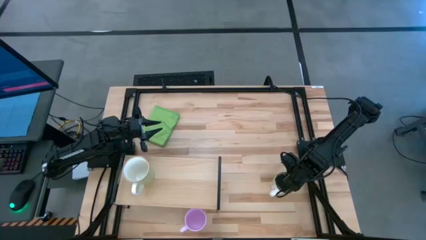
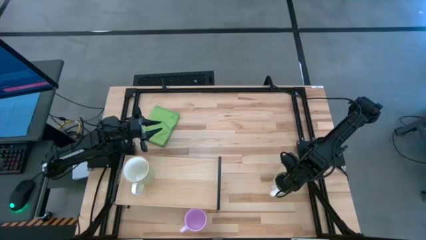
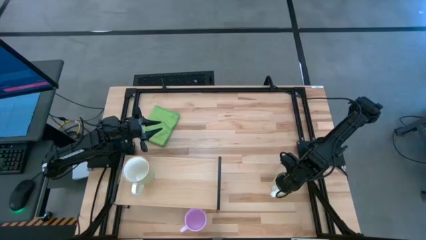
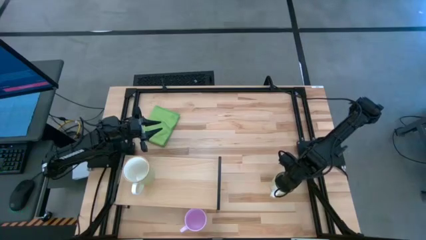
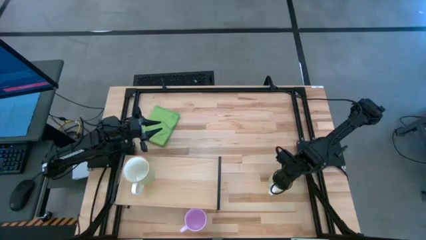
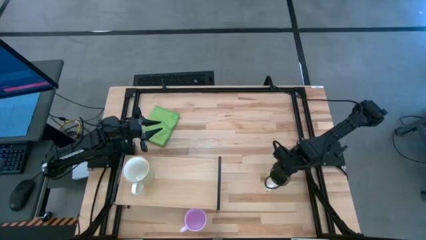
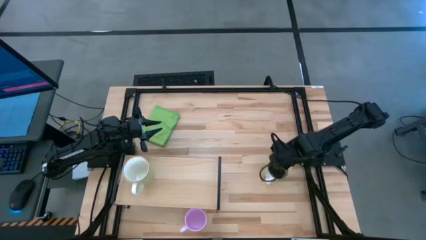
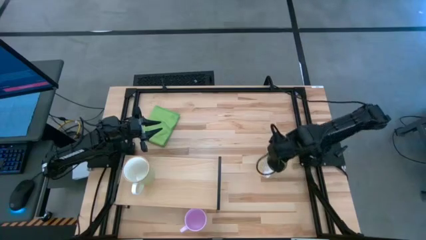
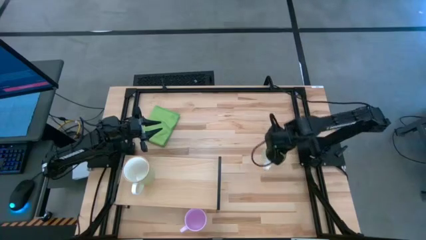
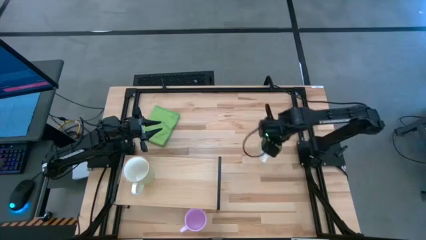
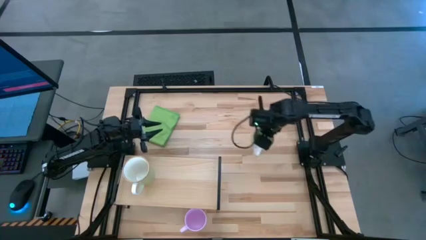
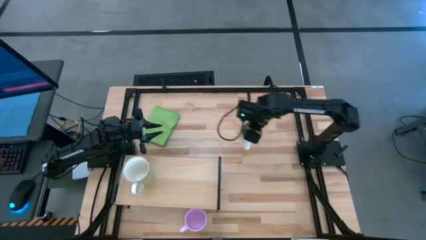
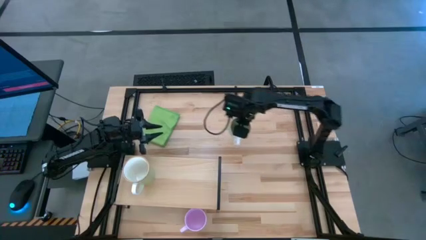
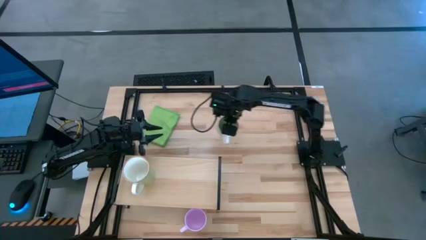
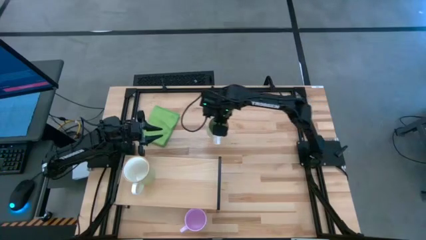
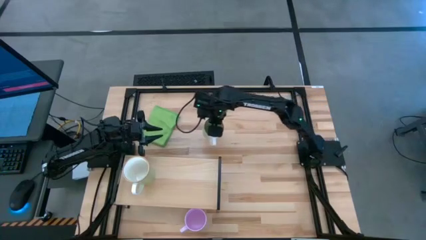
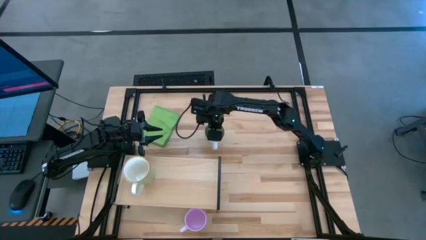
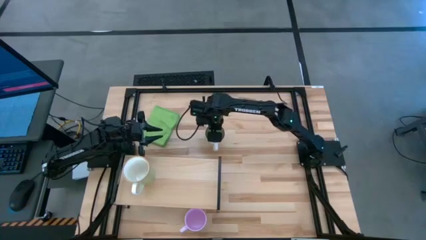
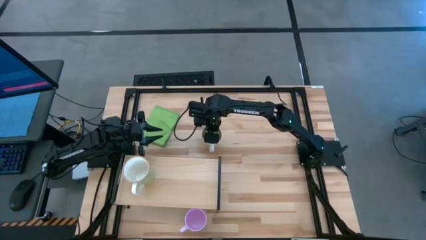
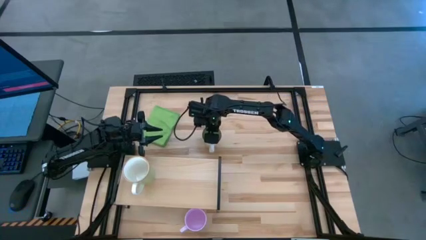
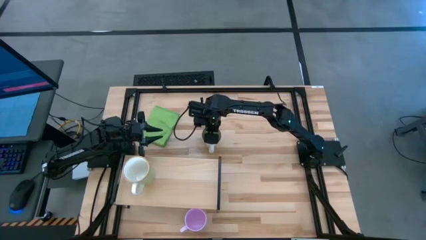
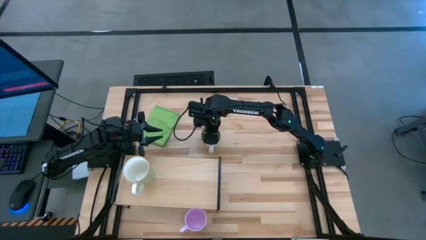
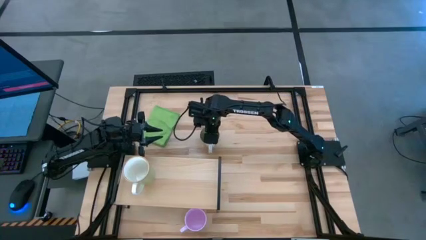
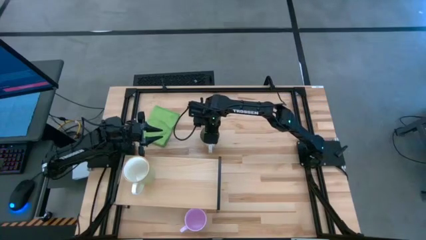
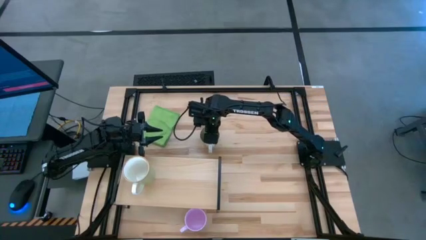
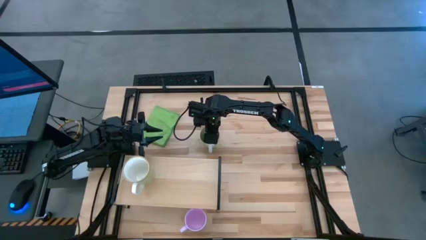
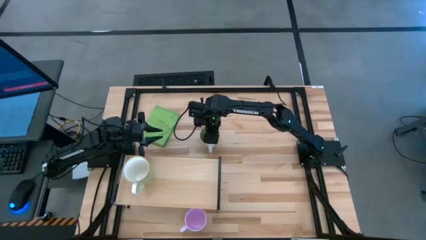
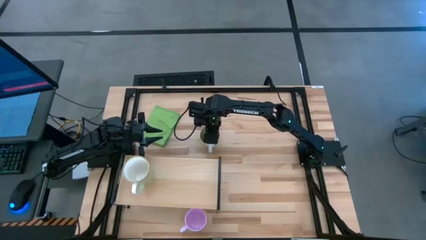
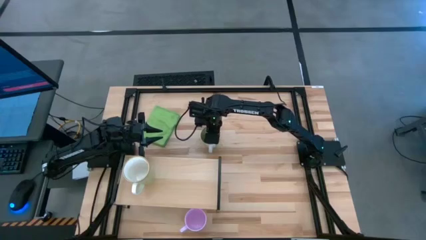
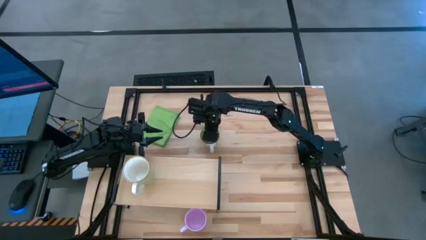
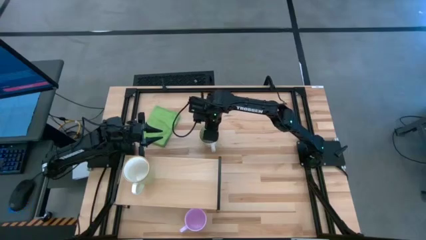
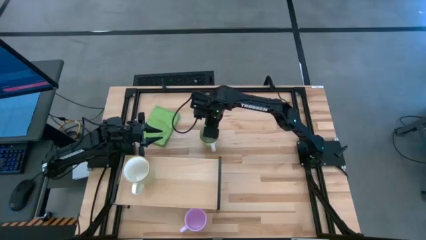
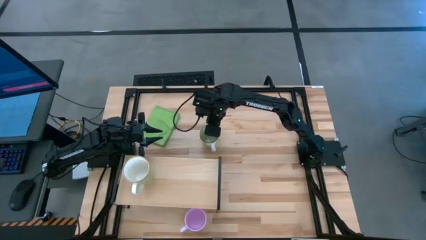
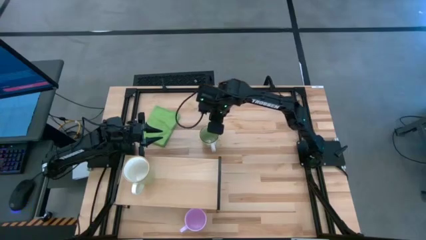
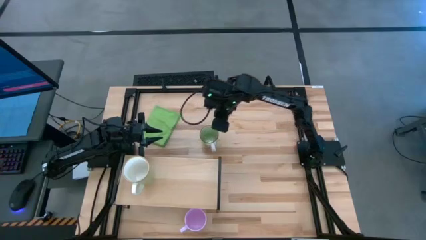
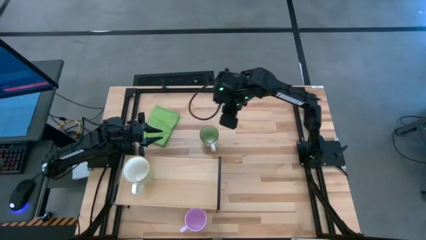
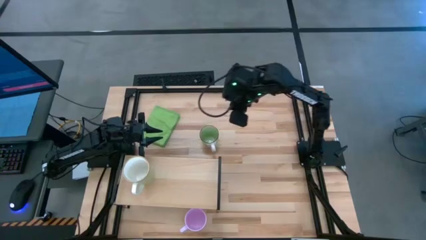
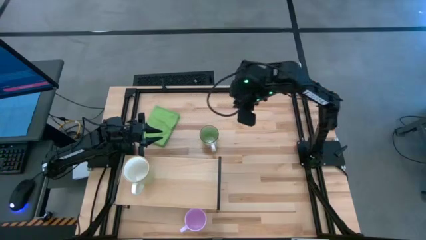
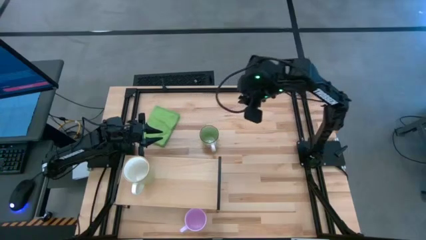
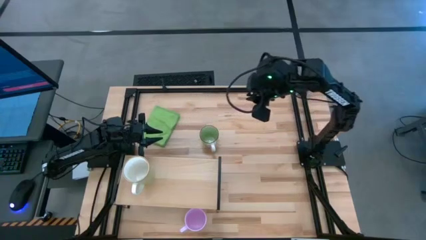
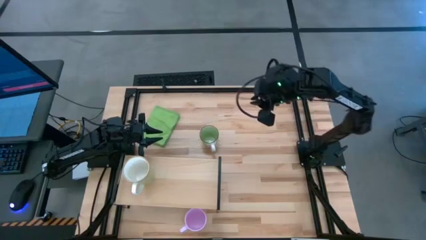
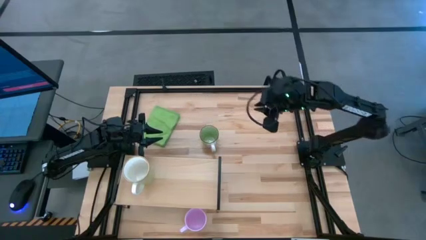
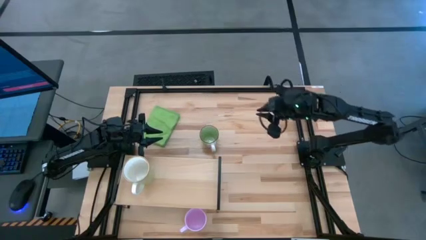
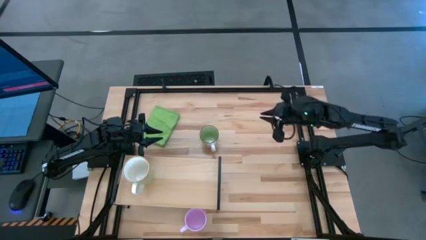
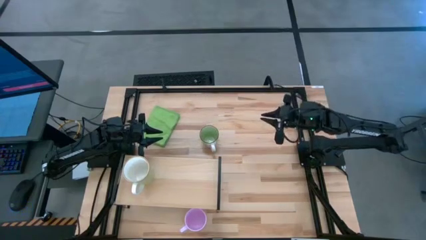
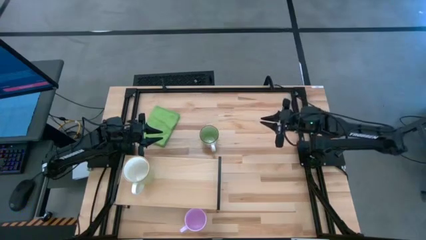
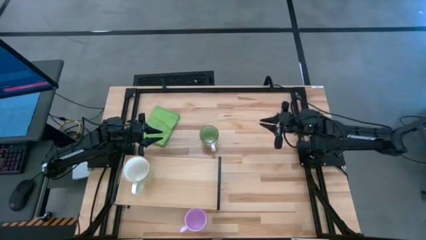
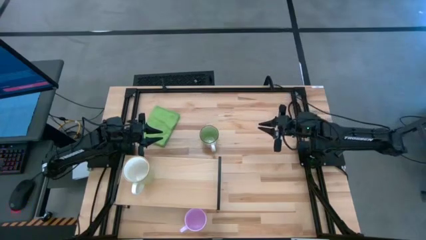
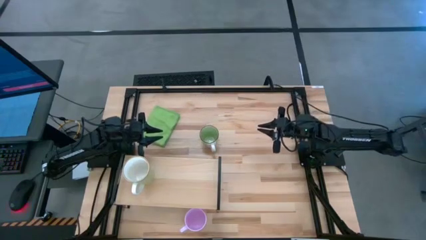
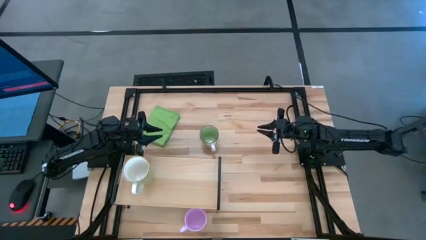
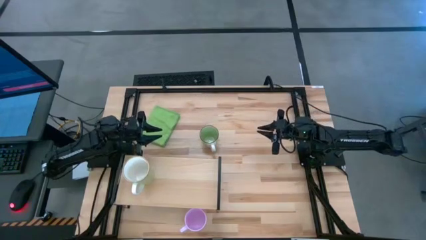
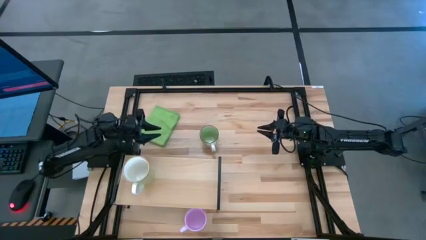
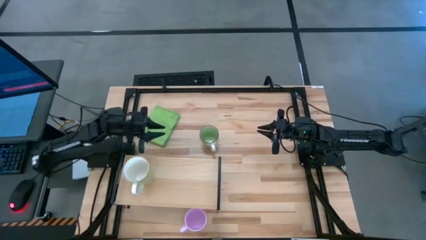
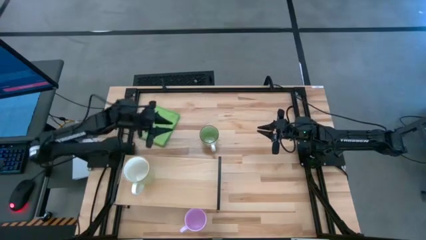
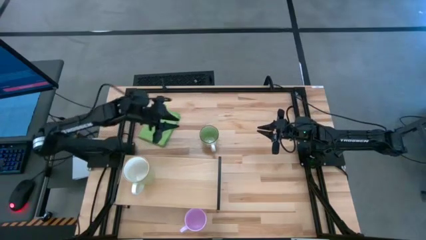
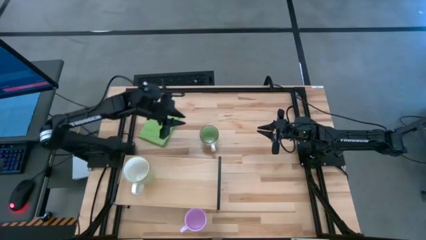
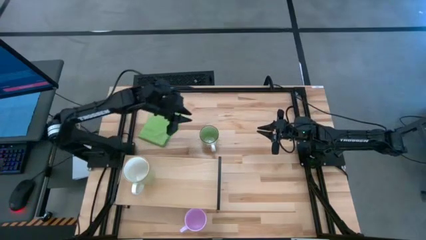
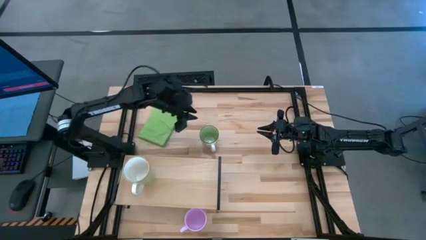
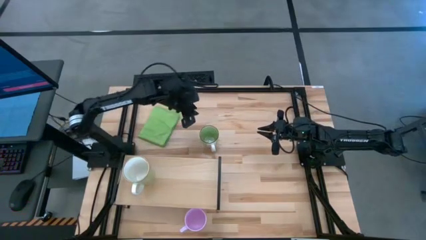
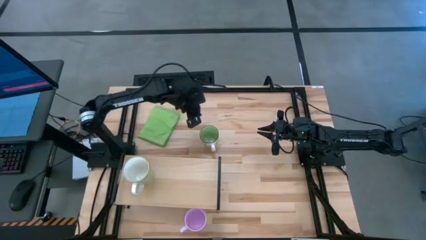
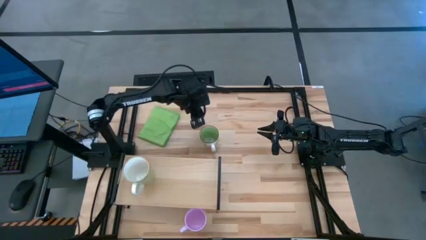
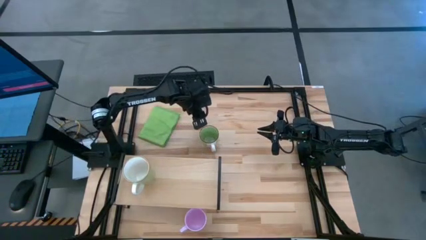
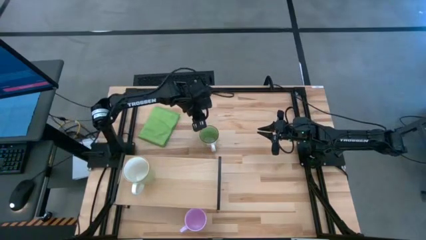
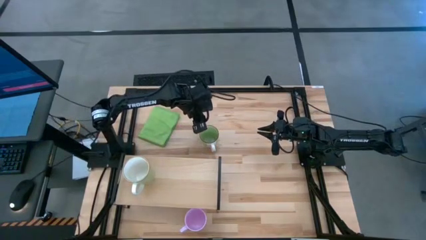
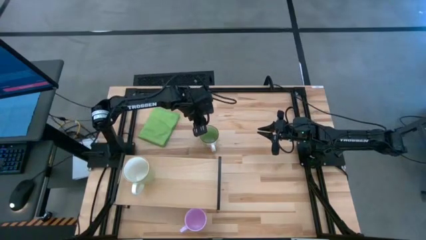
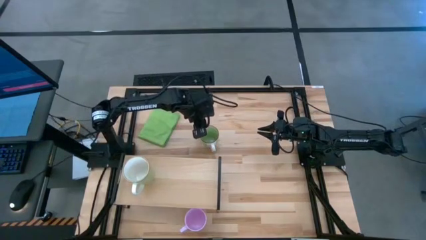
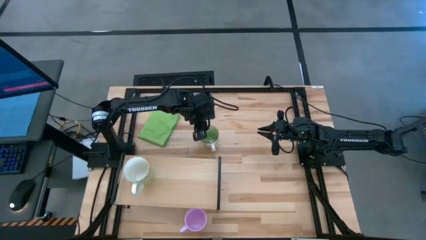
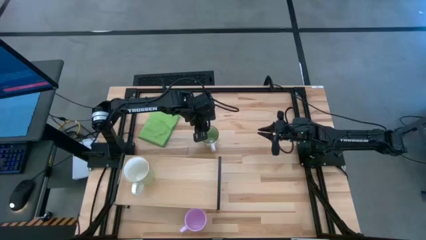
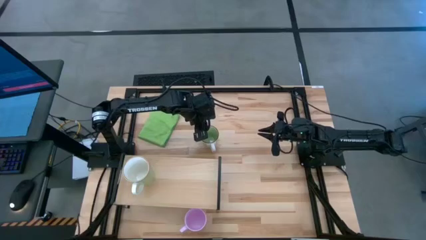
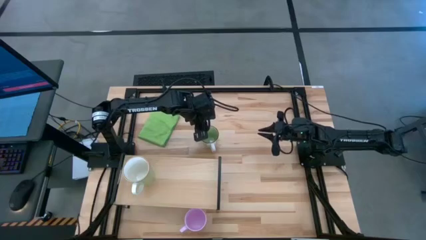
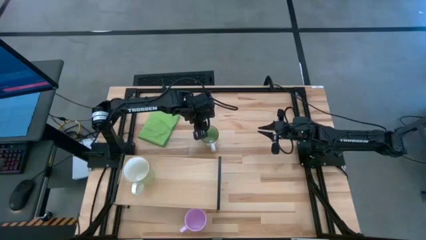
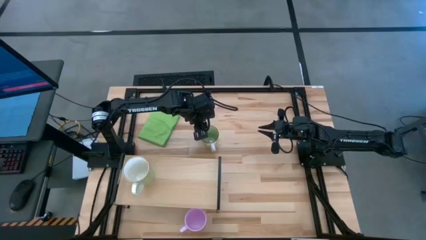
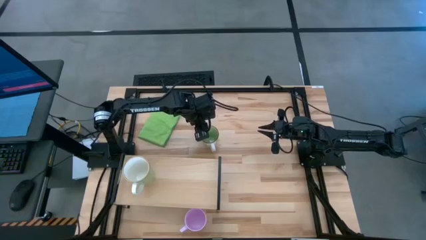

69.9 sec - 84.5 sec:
Task: Stack small to large cups/mugs on shelf
Put the green mug on the shelf

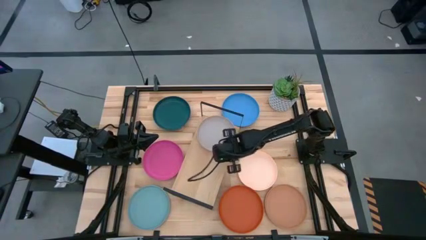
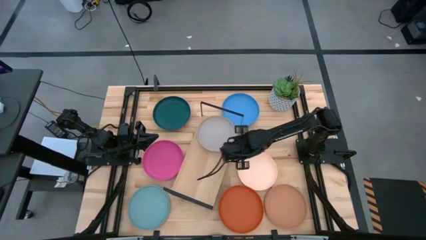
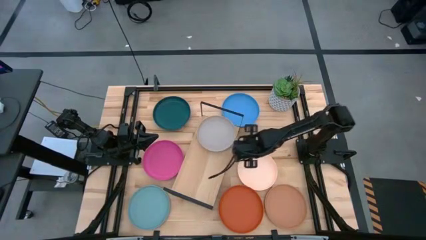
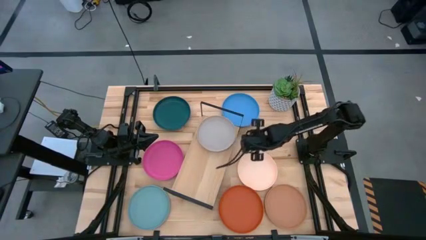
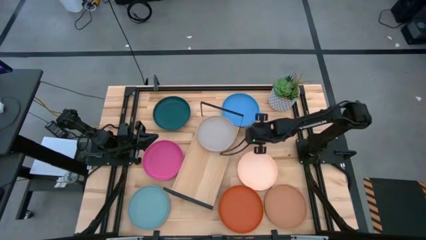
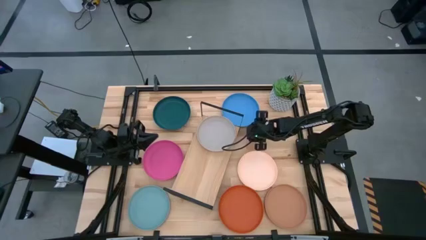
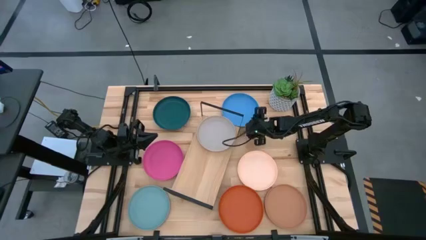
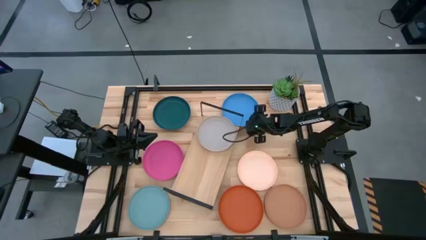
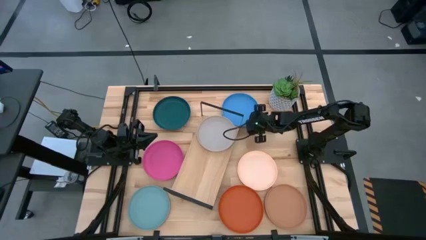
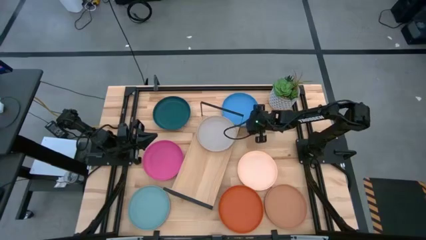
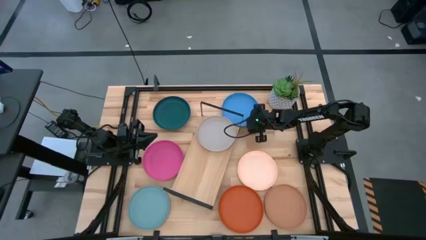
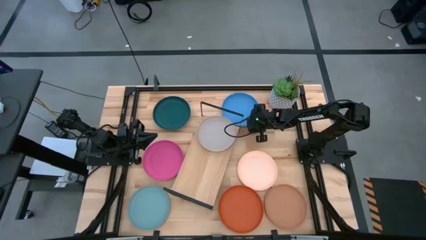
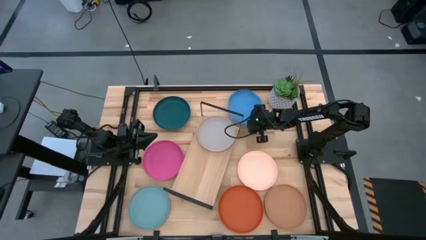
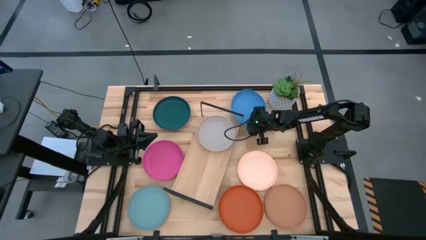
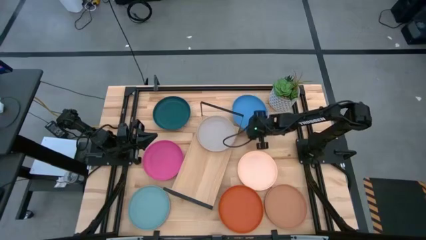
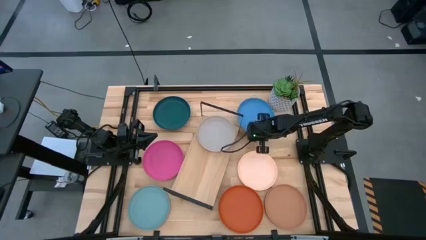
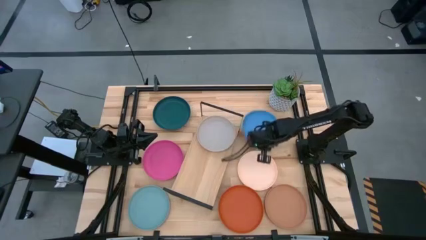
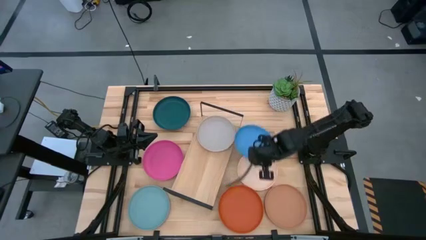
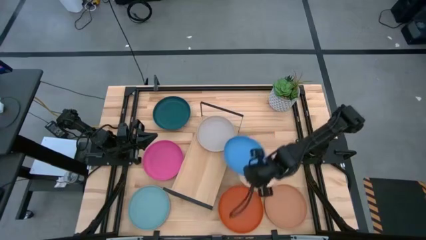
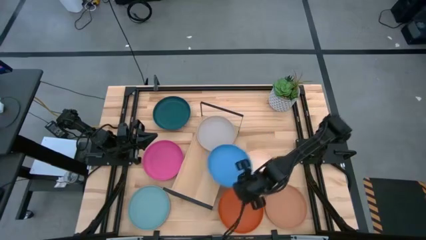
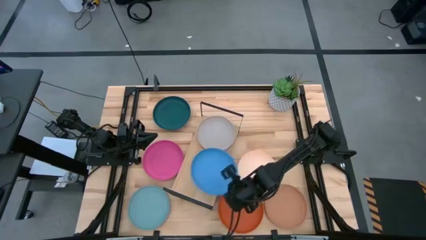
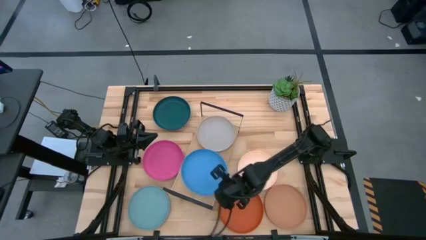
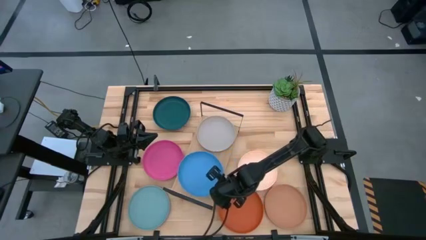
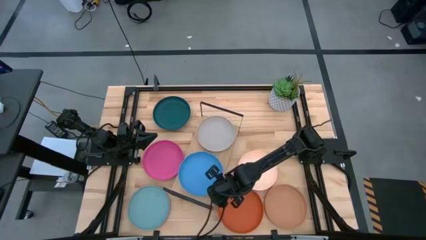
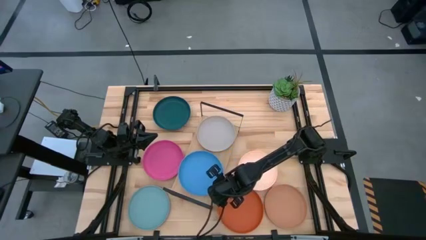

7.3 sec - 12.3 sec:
Task: Place and stack plates onto a shelf
Put the blue plate on the shelf
